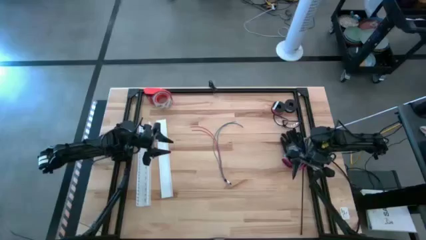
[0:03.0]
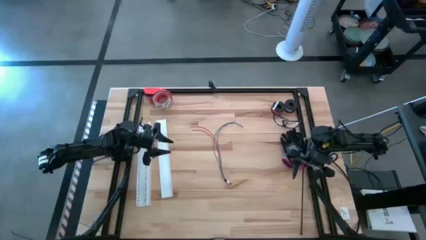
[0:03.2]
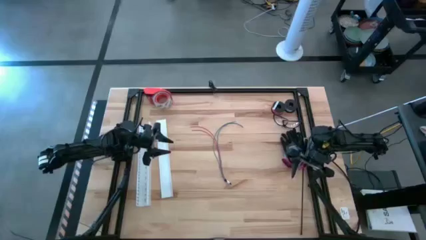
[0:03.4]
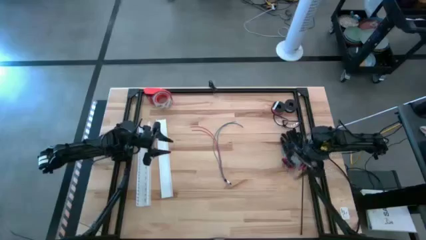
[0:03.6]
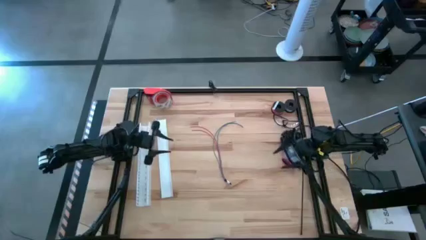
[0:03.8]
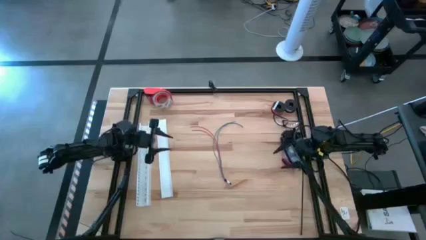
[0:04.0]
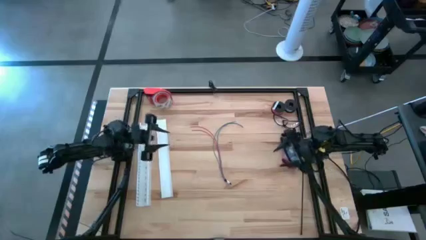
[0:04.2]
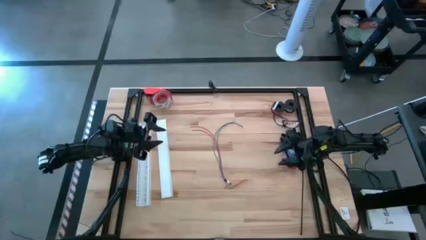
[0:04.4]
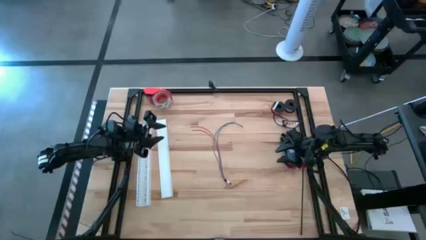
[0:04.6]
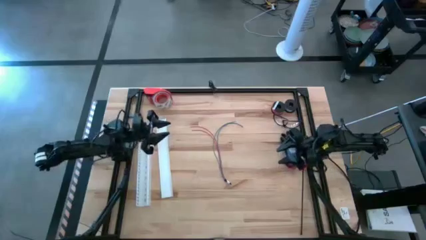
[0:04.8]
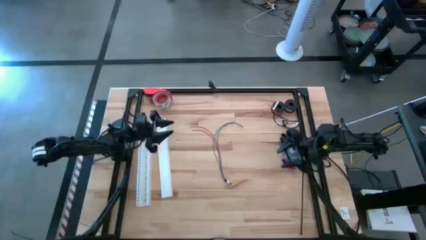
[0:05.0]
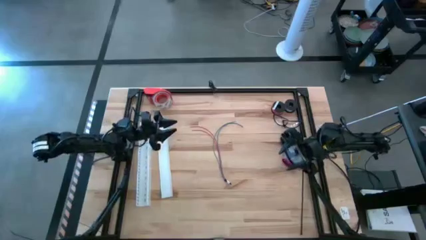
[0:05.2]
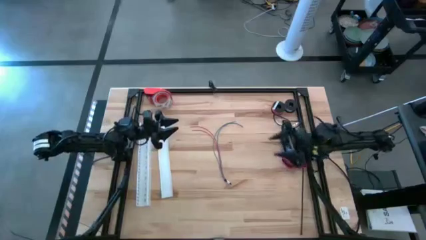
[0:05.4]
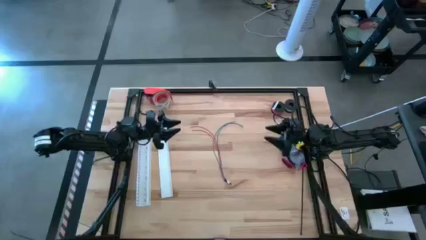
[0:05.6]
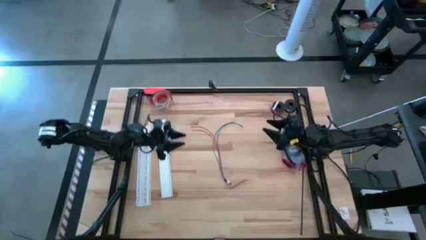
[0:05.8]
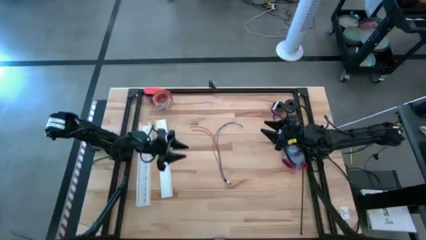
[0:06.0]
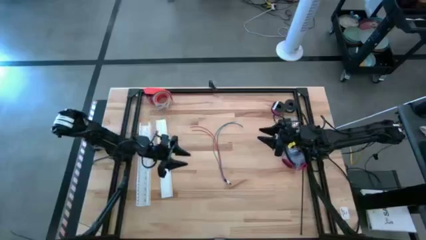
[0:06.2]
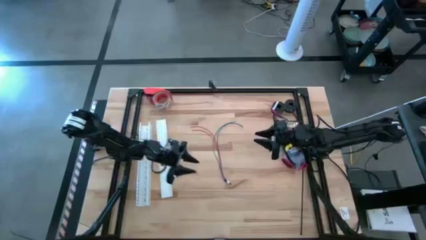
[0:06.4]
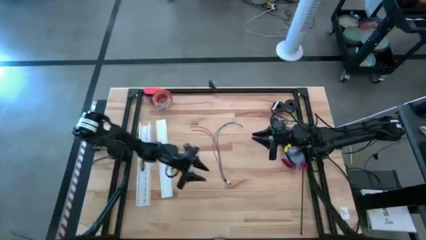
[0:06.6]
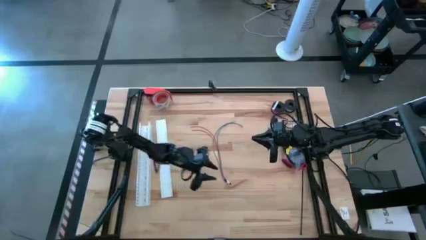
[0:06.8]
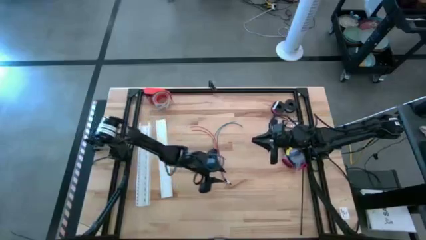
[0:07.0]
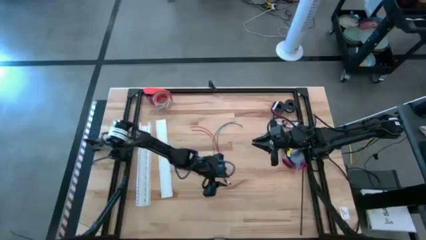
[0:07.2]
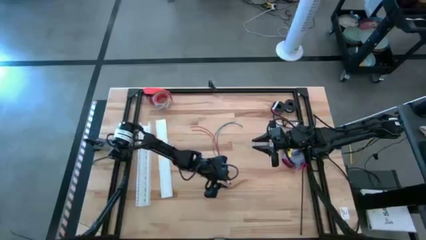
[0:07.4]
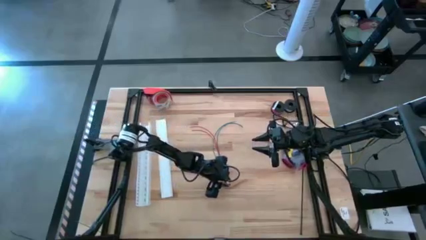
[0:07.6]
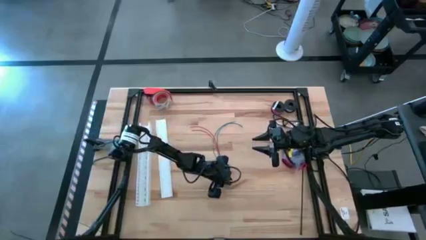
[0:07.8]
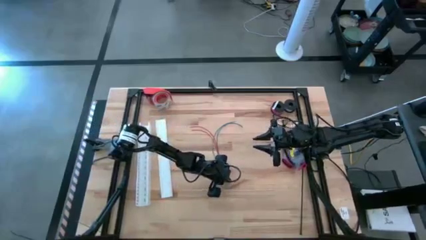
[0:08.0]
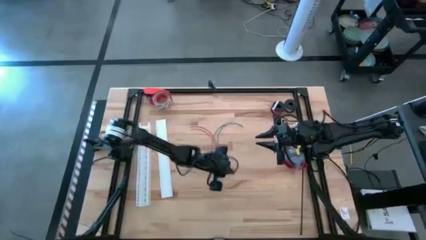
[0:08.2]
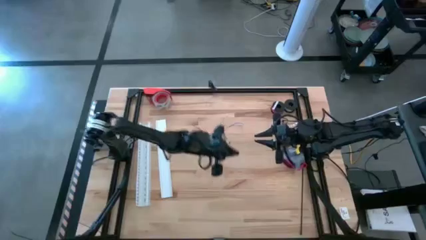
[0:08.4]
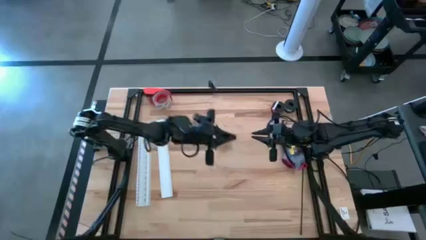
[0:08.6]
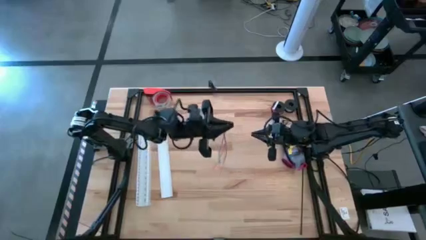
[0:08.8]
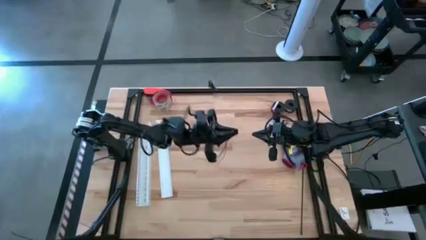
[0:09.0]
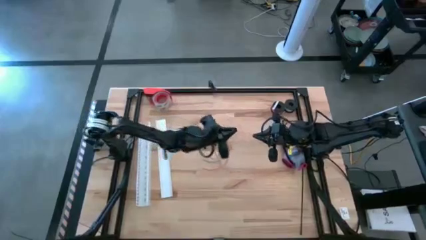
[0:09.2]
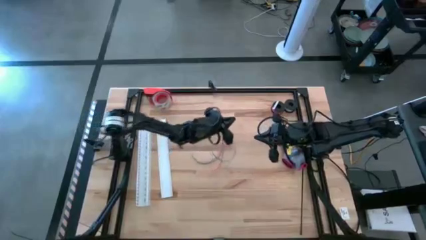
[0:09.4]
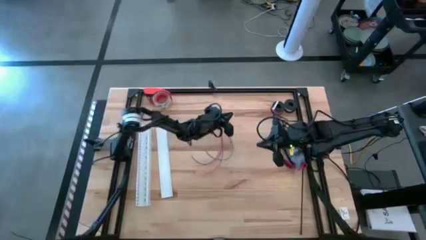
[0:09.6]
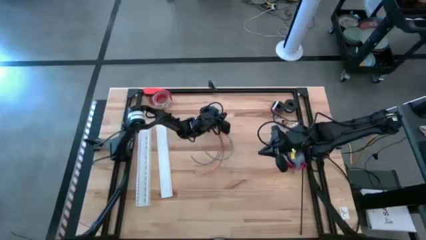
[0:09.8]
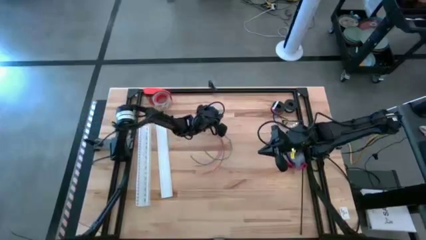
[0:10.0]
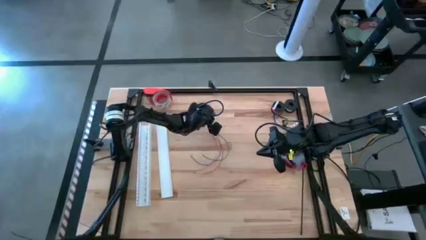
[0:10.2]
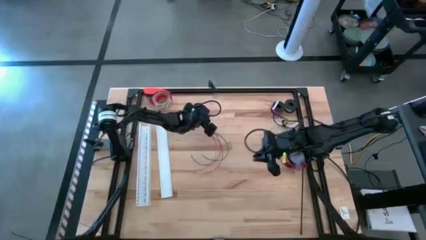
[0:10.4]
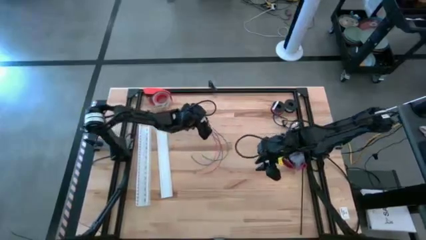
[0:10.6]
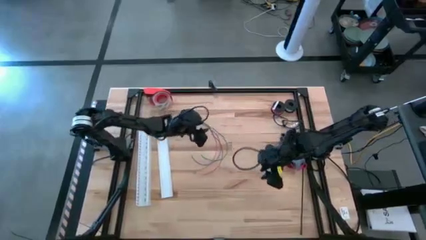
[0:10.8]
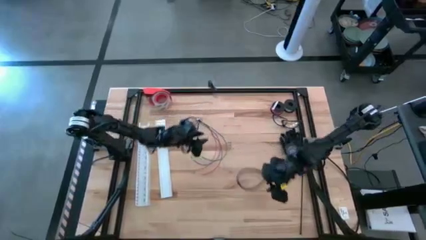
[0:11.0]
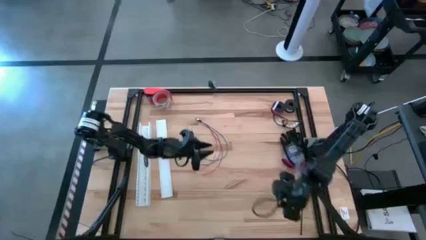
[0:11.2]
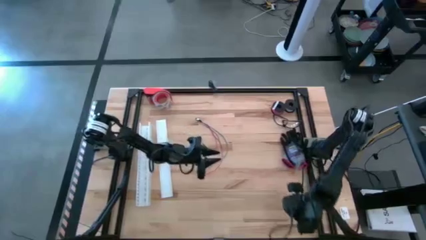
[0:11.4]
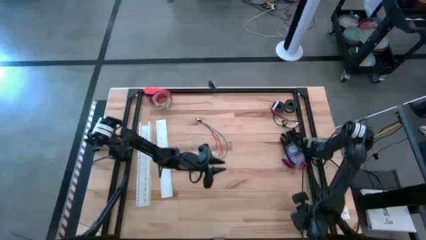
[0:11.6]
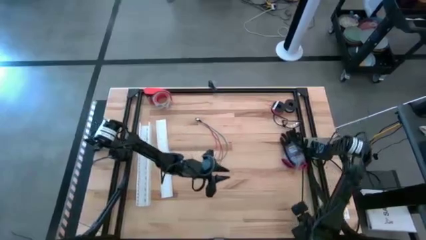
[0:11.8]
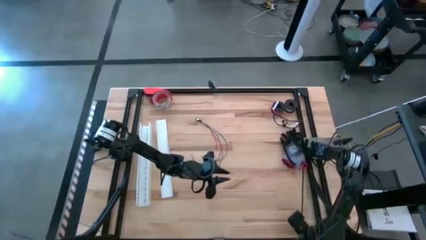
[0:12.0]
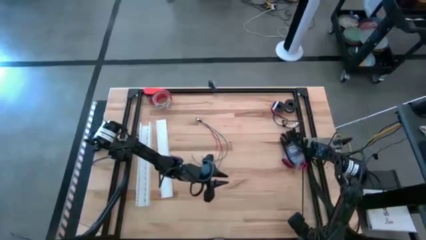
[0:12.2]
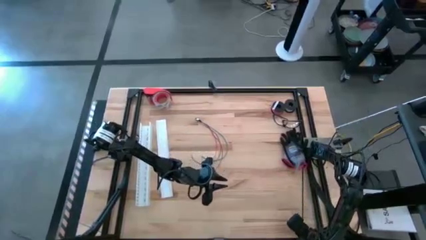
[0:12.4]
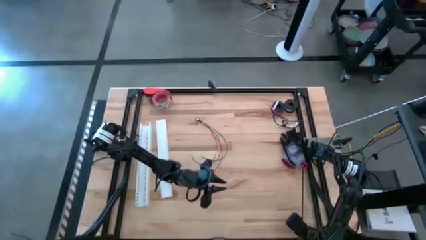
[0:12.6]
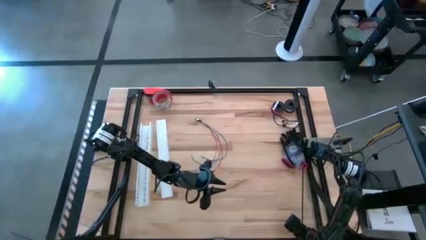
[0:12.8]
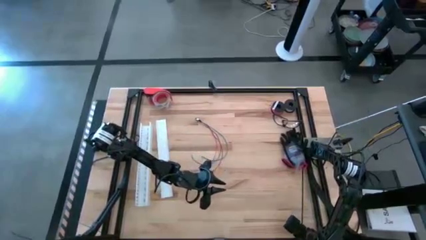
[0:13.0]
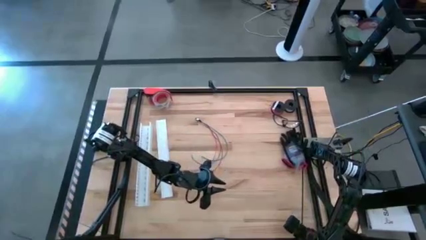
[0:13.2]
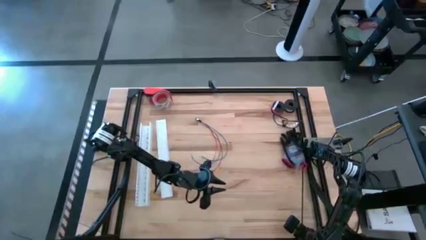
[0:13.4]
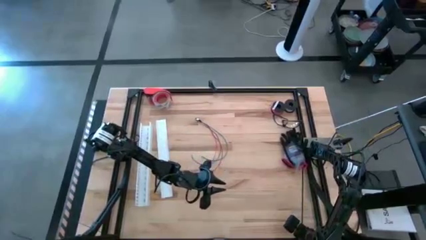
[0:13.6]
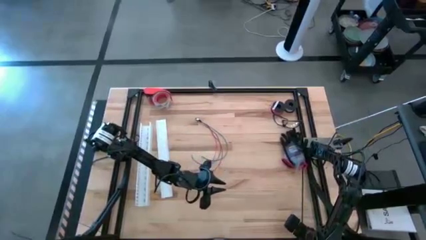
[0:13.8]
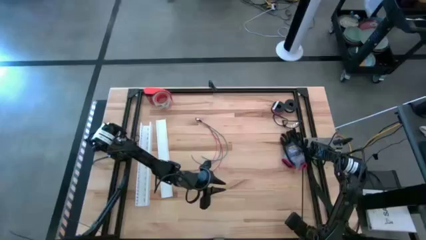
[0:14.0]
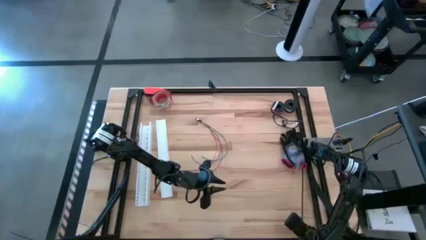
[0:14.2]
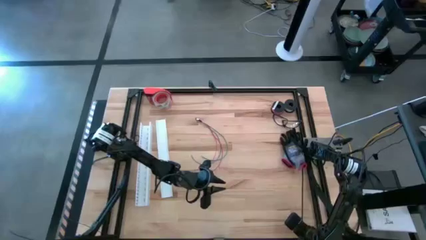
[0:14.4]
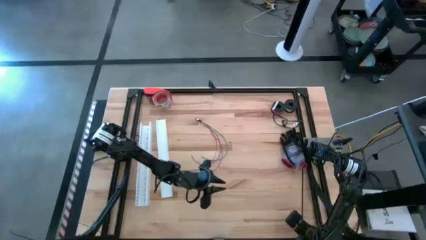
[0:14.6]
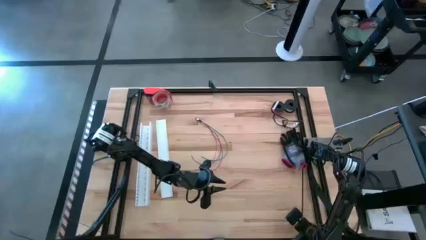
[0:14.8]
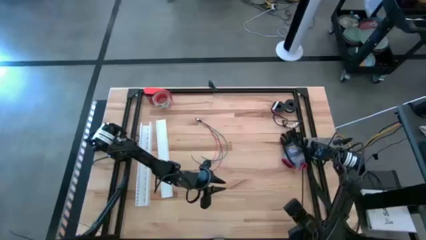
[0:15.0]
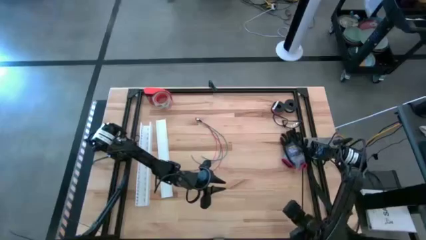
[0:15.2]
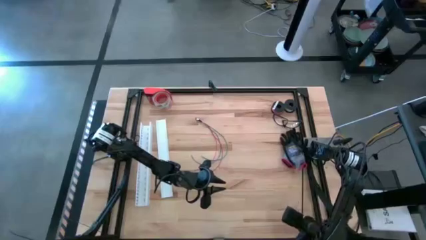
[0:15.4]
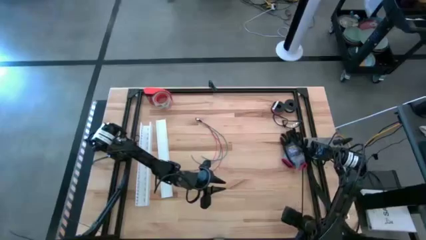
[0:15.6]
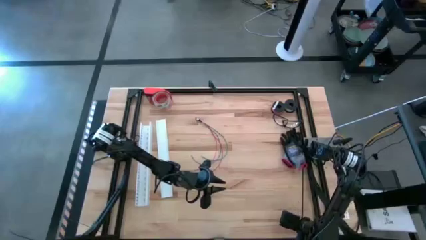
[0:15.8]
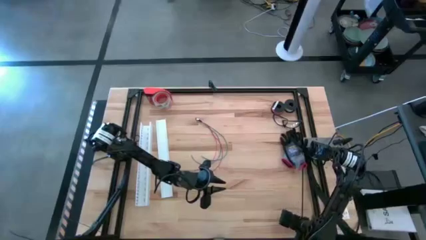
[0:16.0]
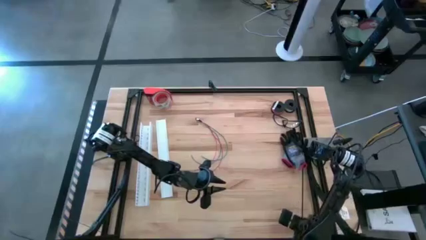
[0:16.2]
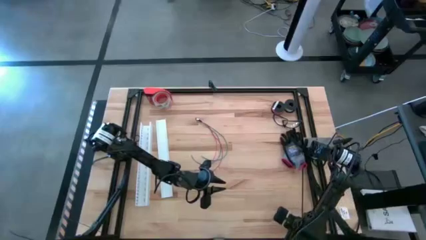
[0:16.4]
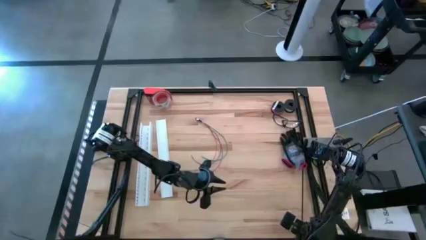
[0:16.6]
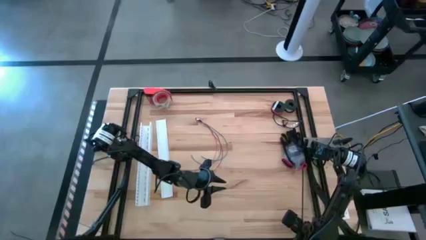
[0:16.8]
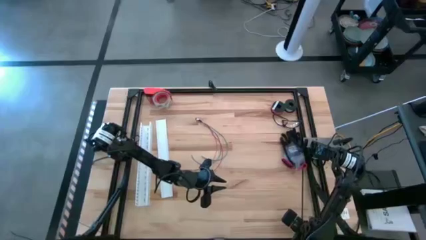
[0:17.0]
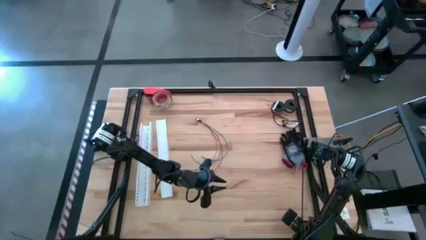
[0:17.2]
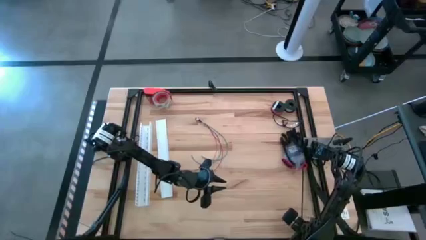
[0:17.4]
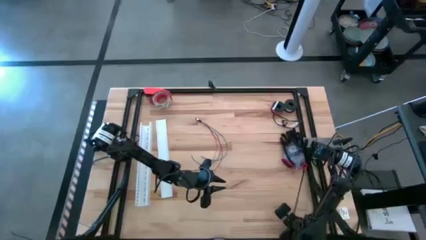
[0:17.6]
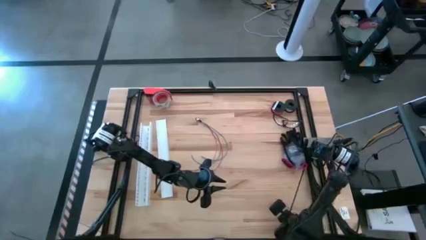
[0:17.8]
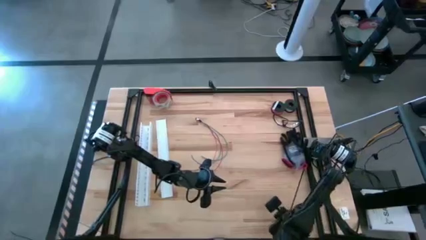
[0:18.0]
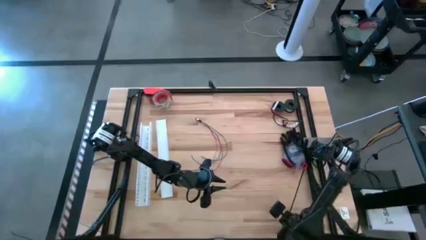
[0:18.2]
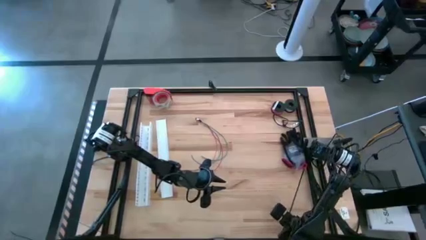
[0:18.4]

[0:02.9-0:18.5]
Task: Ziptie cables
Wrap the black zip tie around the cables
